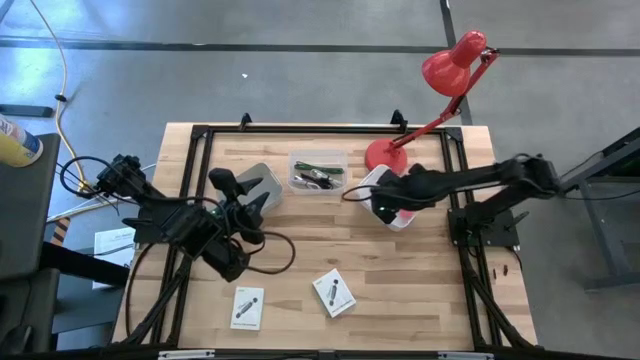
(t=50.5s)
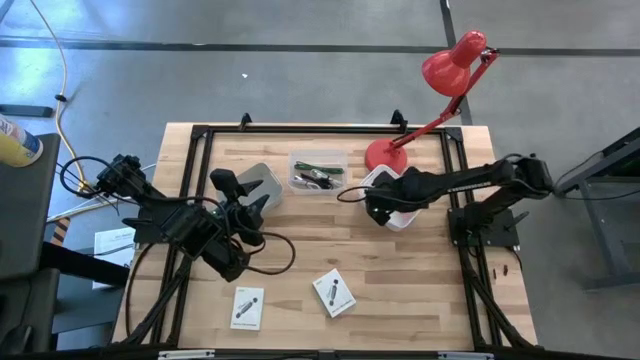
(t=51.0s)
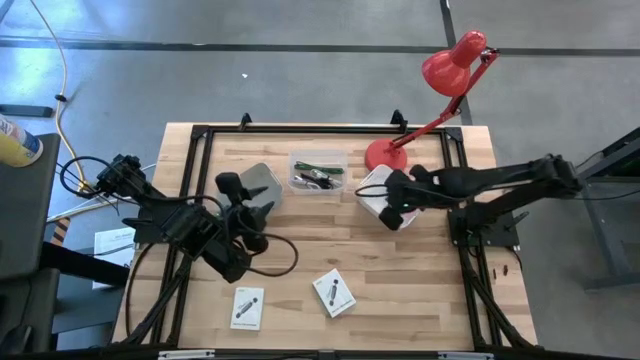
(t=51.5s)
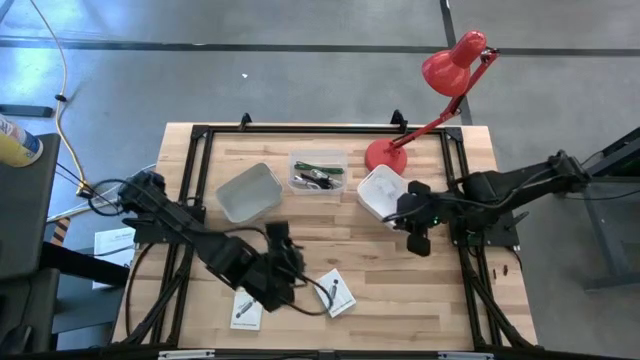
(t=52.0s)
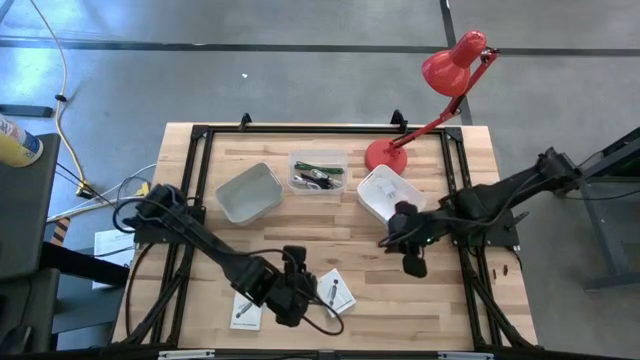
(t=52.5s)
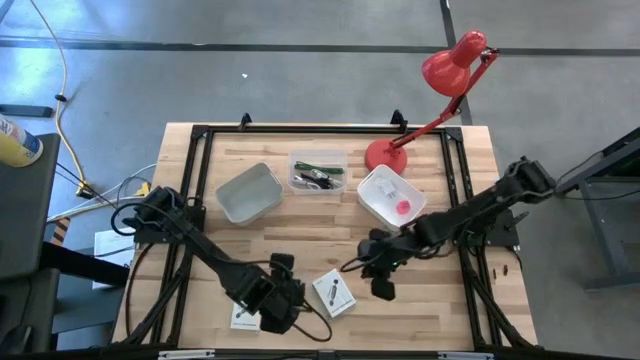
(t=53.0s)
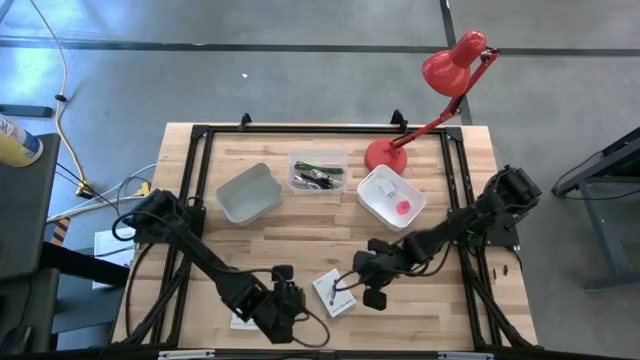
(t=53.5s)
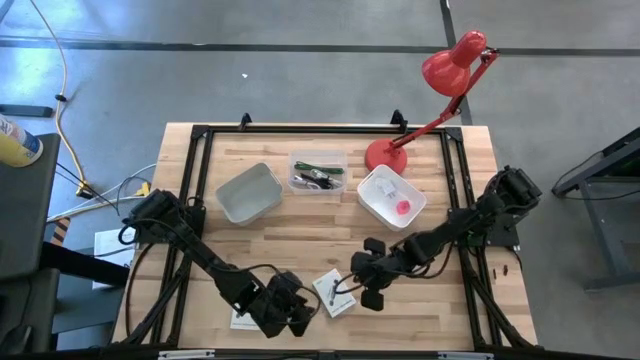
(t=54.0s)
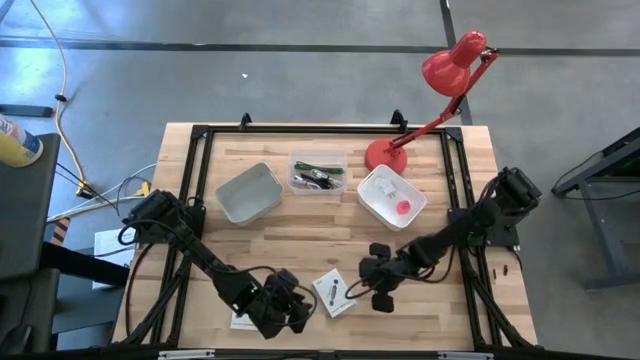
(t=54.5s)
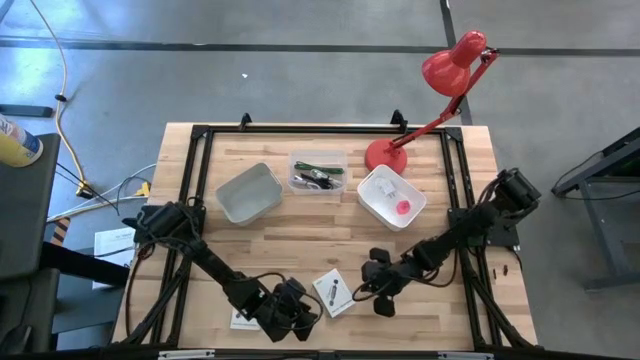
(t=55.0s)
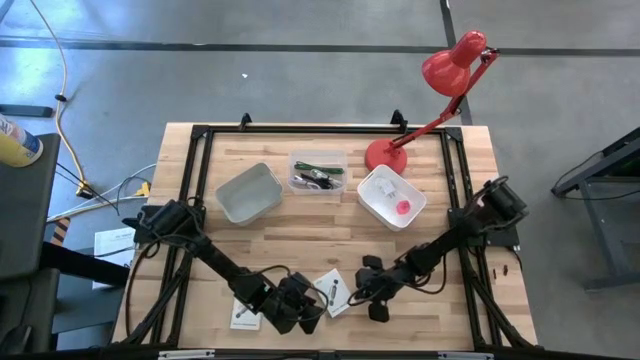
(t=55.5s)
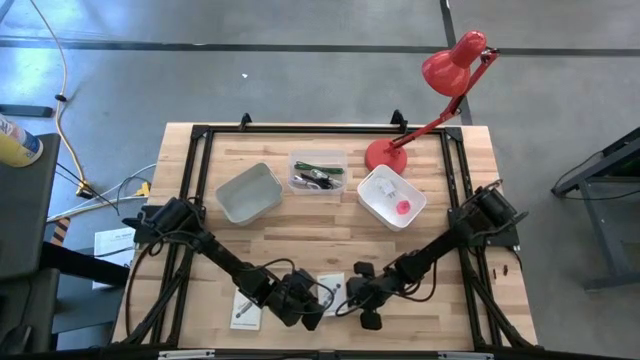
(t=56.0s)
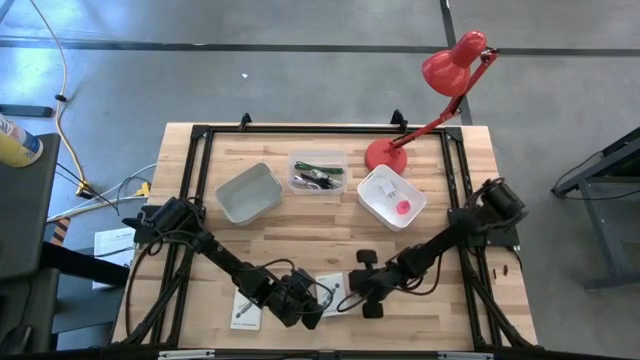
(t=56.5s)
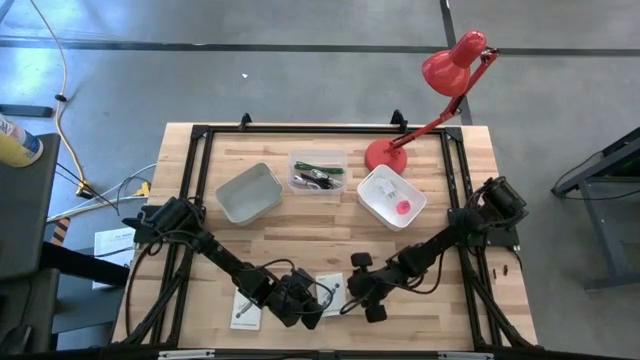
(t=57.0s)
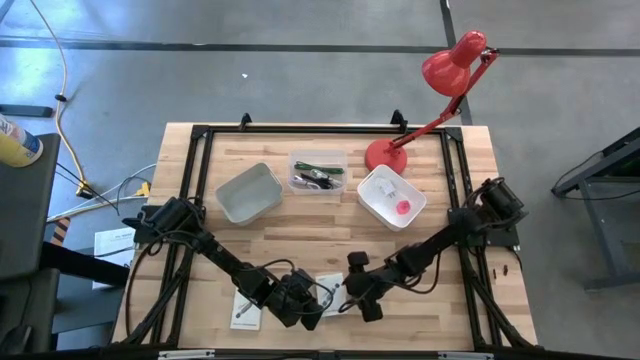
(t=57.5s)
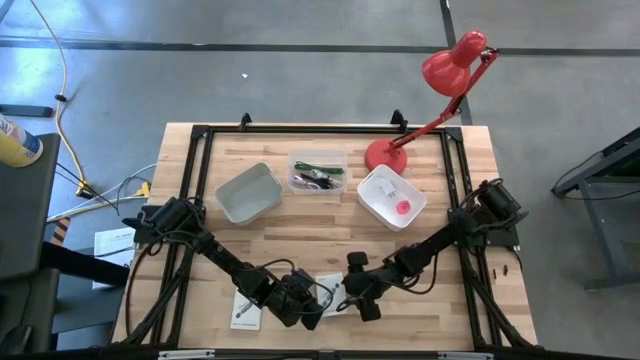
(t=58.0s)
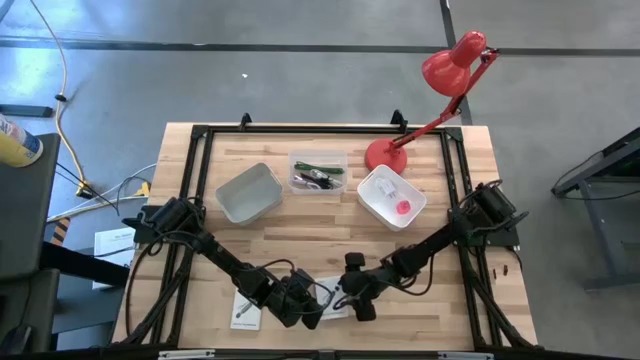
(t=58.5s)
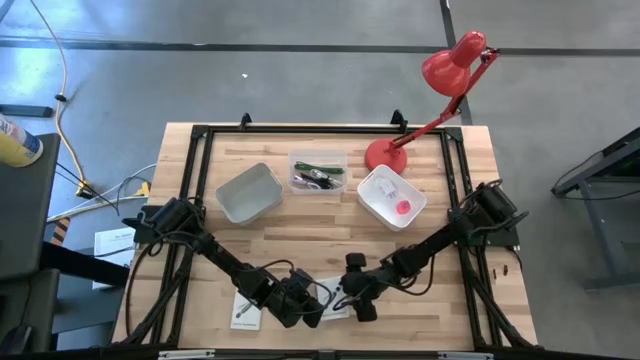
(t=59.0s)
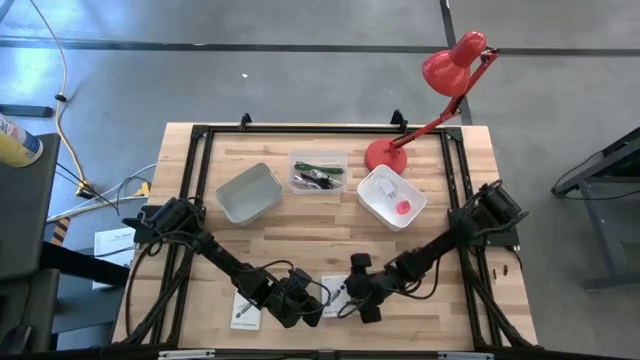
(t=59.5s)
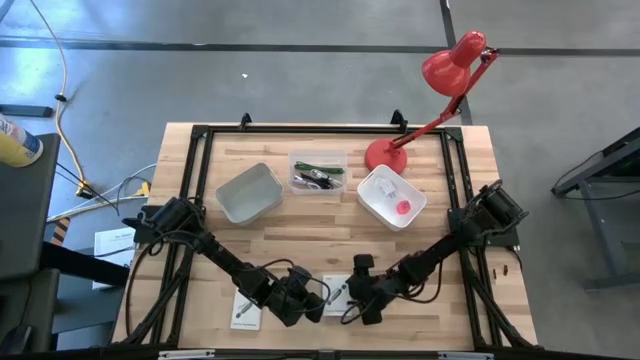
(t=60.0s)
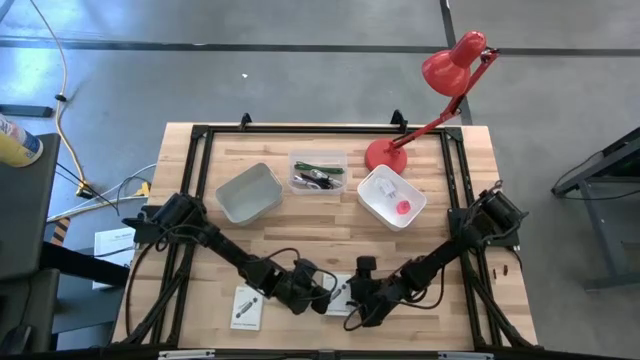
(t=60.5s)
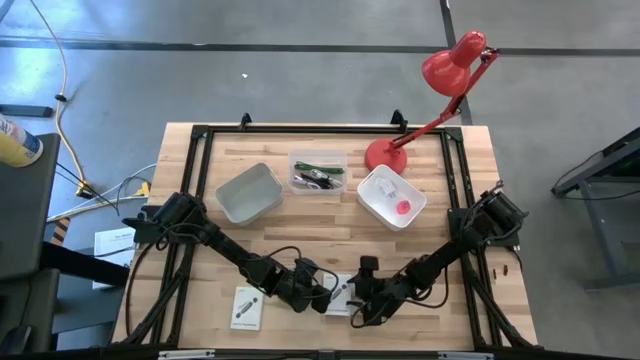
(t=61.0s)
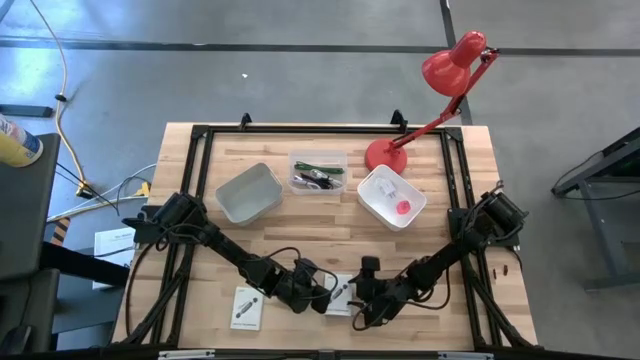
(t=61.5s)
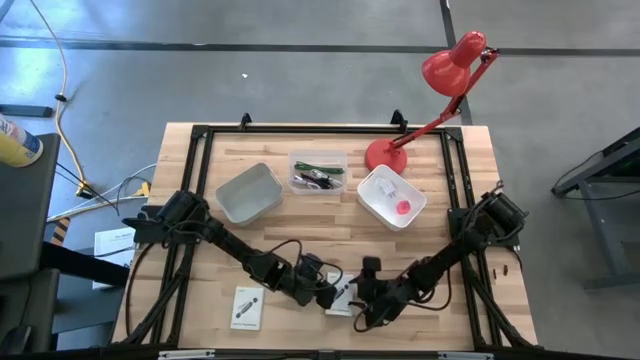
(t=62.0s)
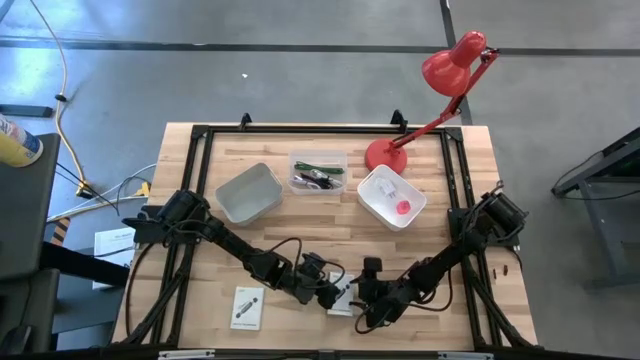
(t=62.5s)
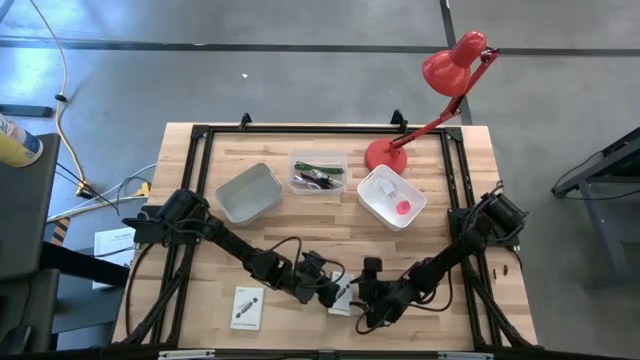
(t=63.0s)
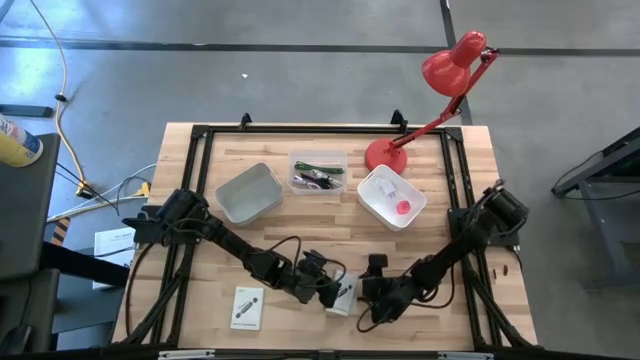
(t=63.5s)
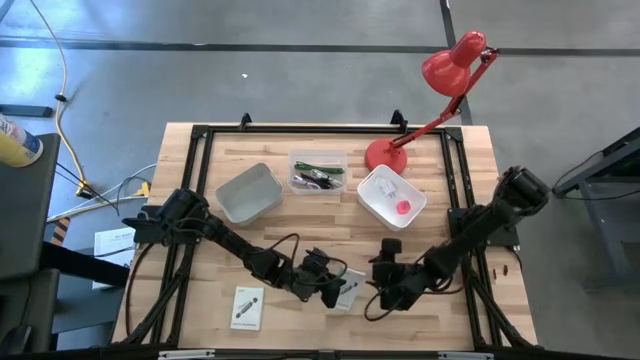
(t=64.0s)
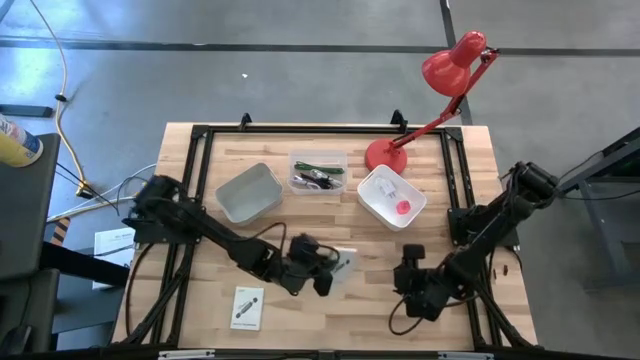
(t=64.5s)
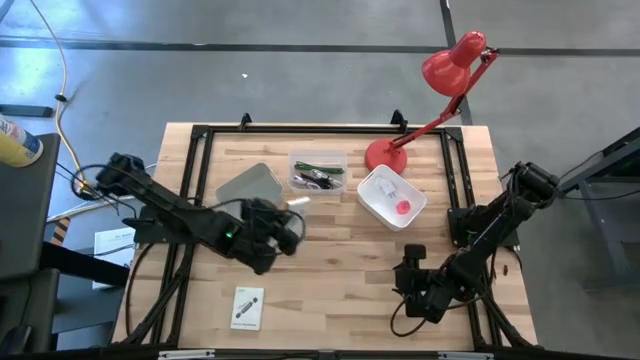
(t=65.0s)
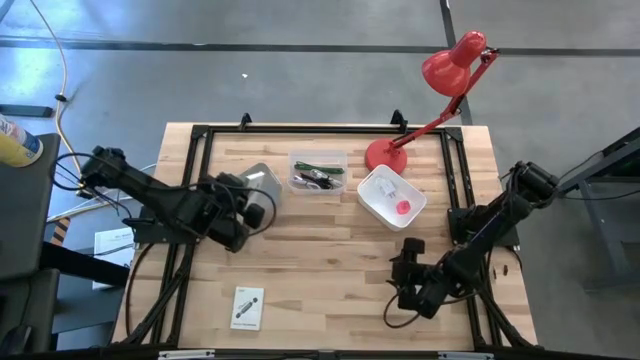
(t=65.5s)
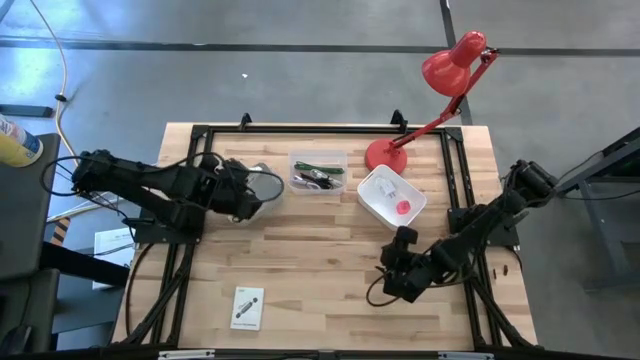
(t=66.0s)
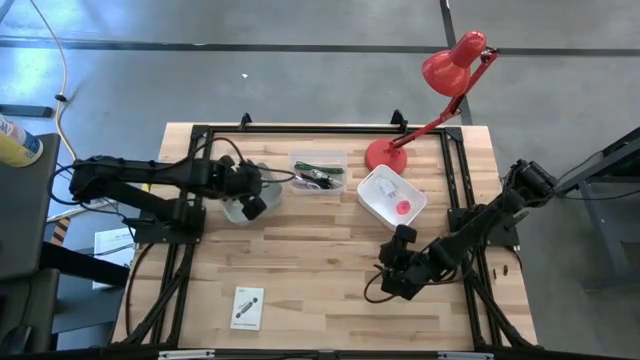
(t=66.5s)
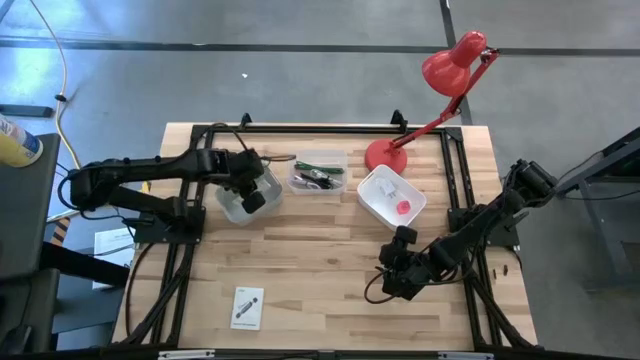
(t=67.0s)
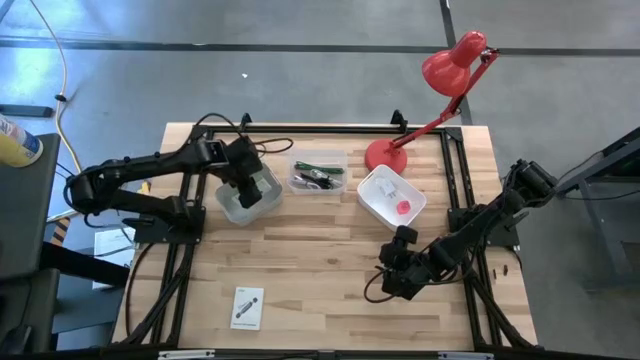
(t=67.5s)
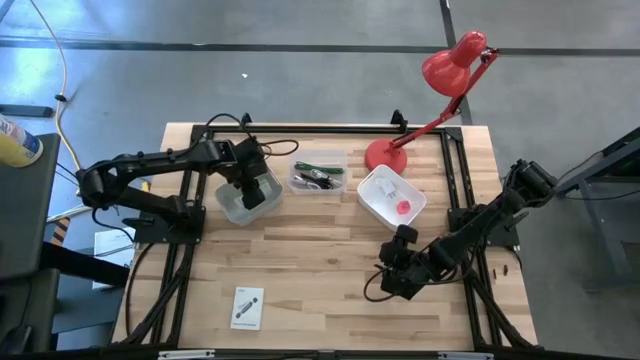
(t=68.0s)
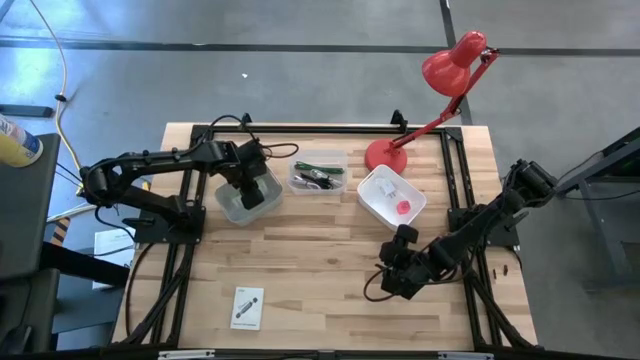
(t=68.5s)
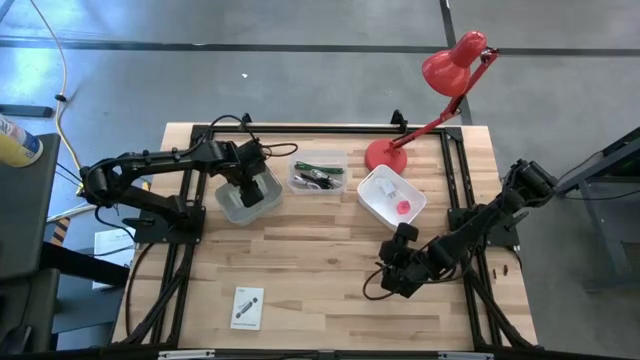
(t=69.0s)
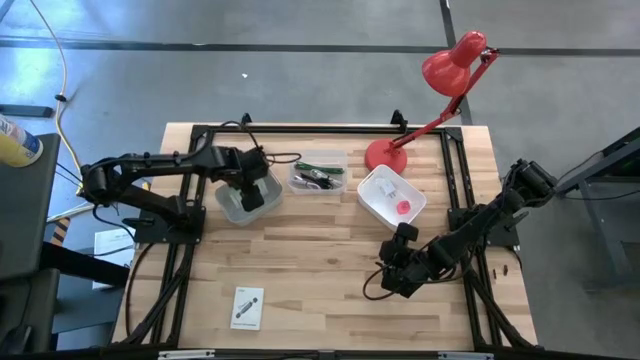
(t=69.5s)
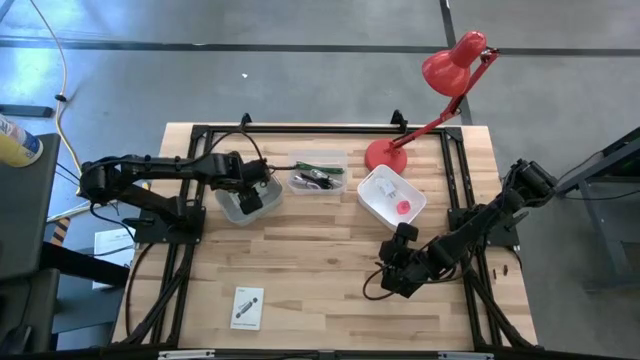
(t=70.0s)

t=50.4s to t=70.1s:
Task: Pick and place items into bin
Put the right card reader box into the gray bin

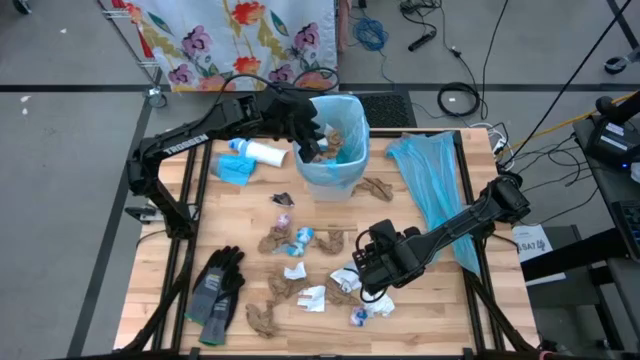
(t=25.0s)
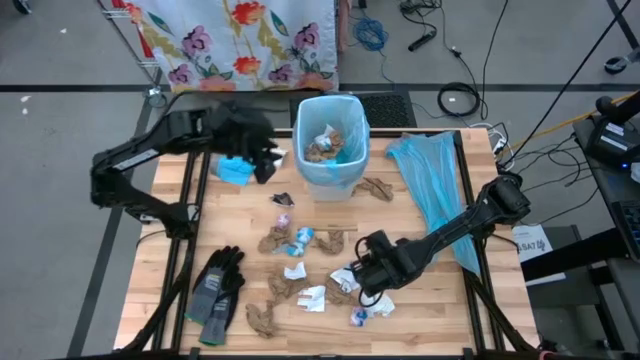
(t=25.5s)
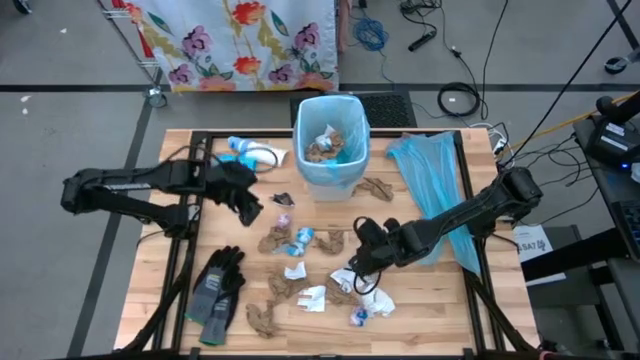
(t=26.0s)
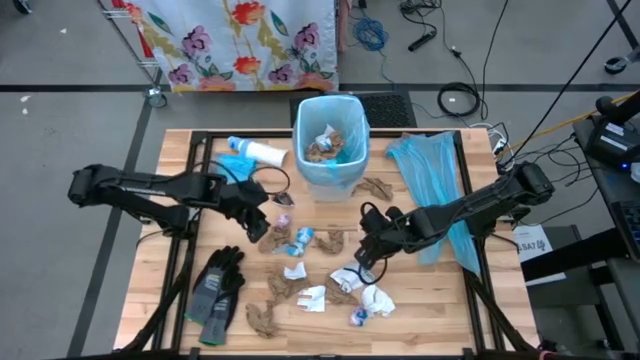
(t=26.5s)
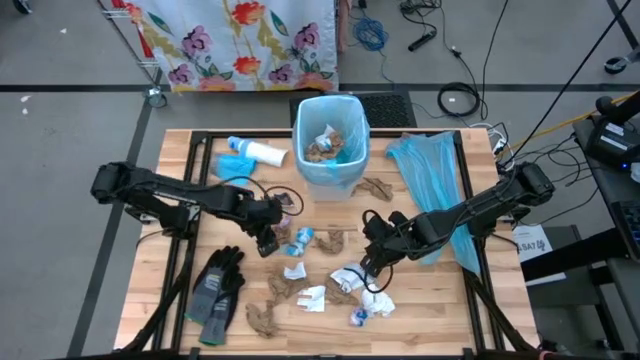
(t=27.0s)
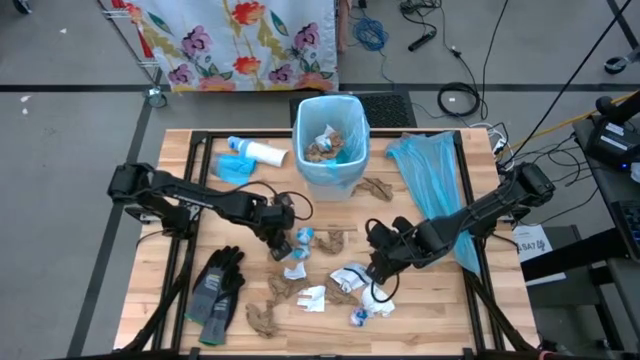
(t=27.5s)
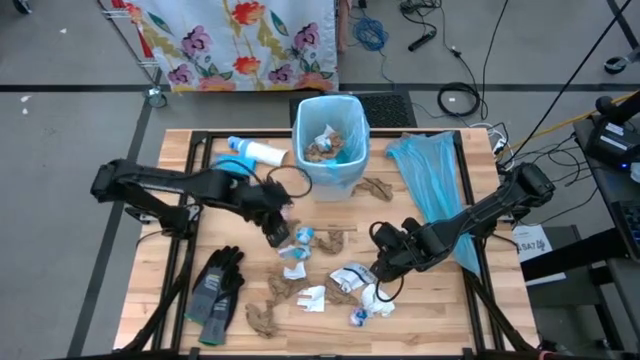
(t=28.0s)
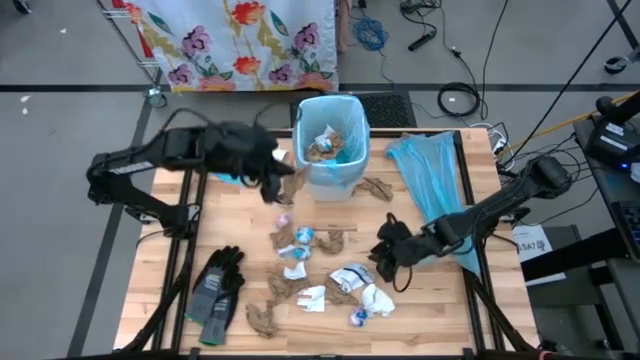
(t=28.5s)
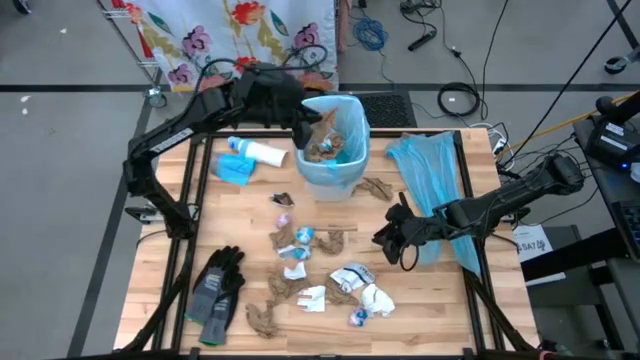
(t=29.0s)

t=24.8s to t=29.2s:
Task: place trash/remove bag and relplace
Put the brown paper into the trash bin
